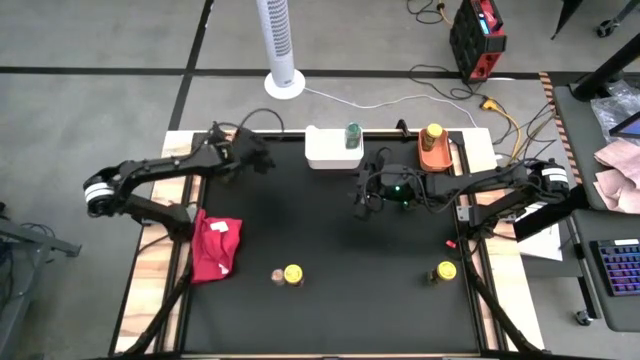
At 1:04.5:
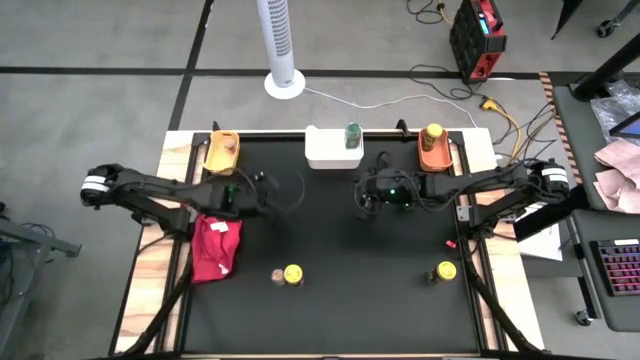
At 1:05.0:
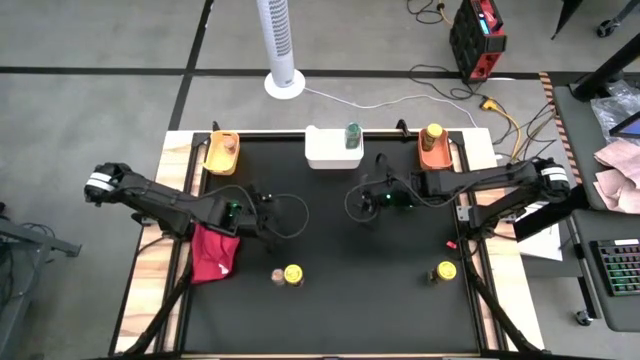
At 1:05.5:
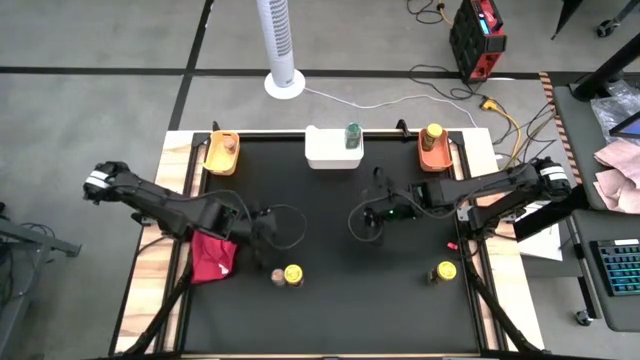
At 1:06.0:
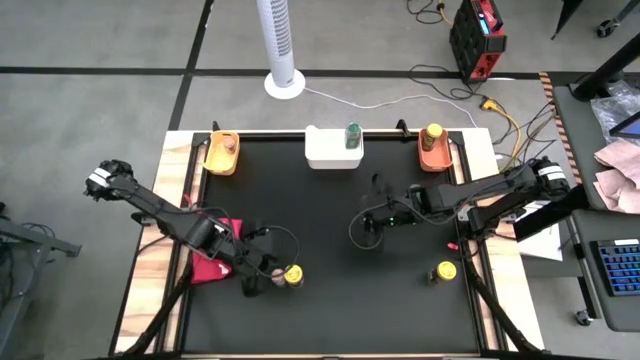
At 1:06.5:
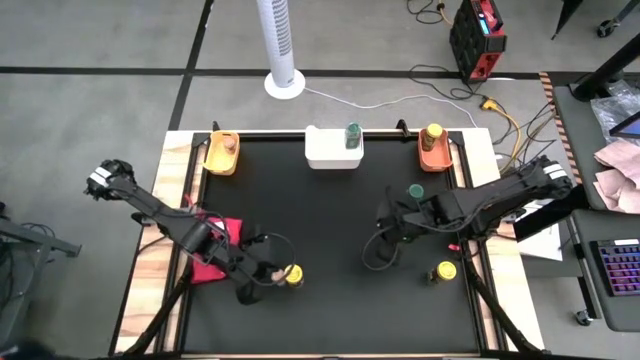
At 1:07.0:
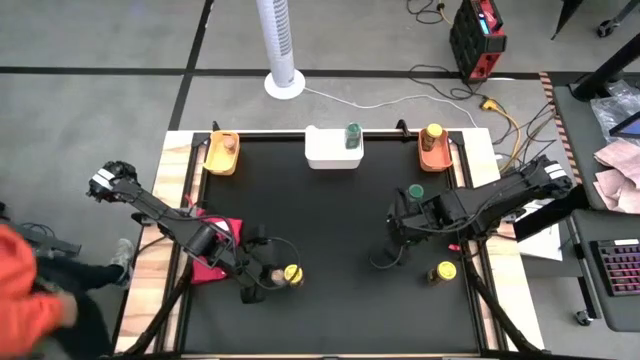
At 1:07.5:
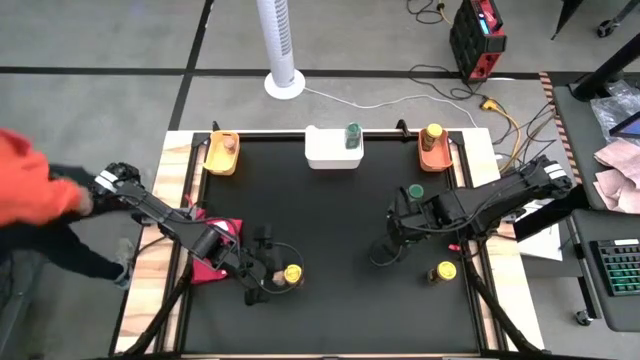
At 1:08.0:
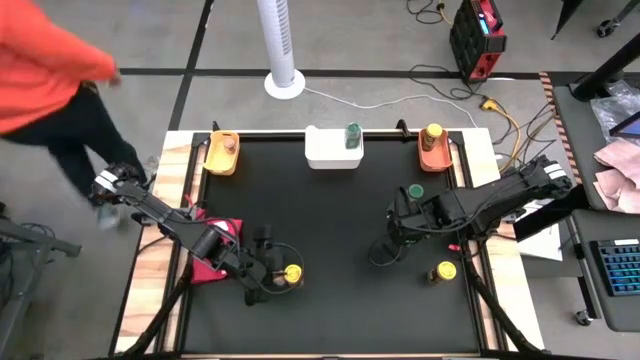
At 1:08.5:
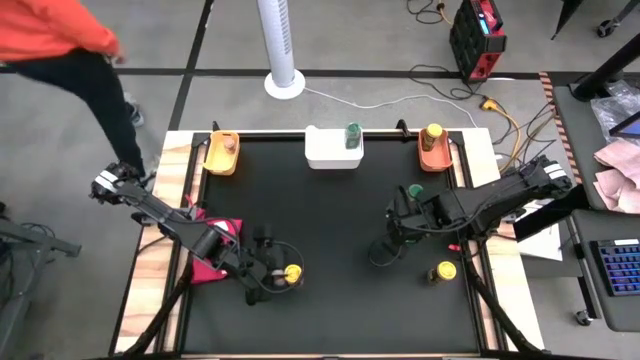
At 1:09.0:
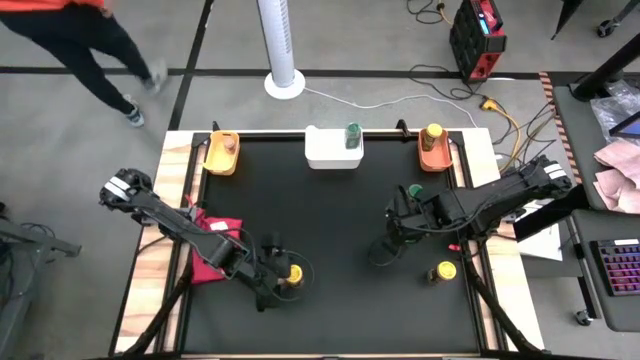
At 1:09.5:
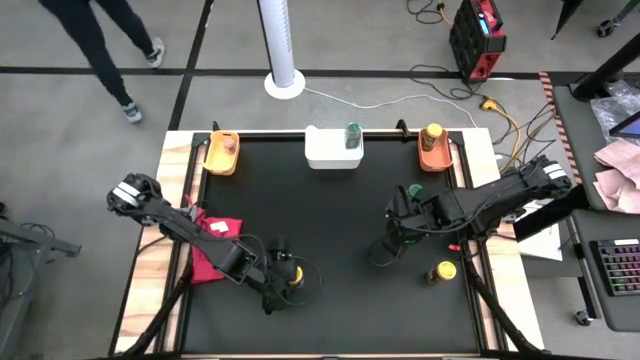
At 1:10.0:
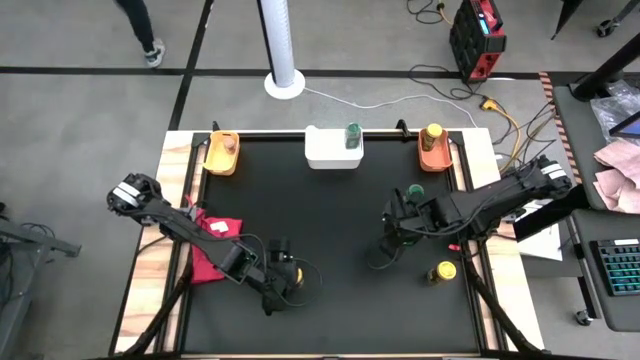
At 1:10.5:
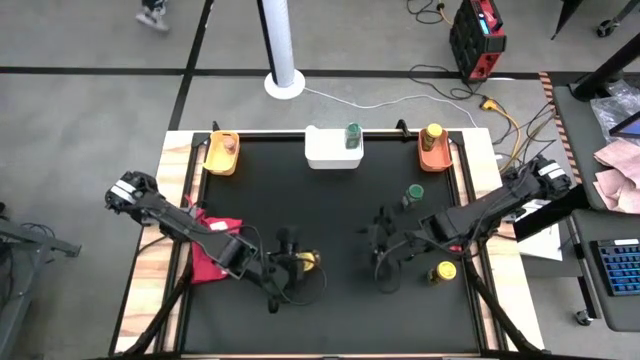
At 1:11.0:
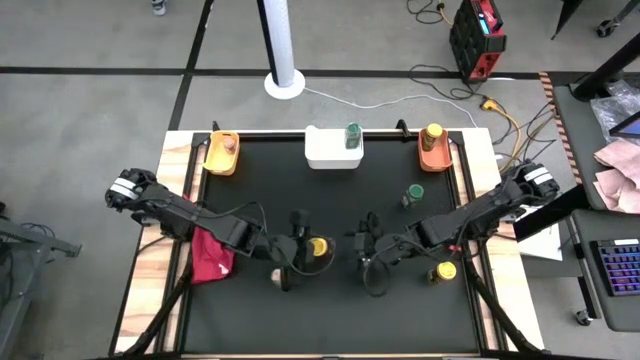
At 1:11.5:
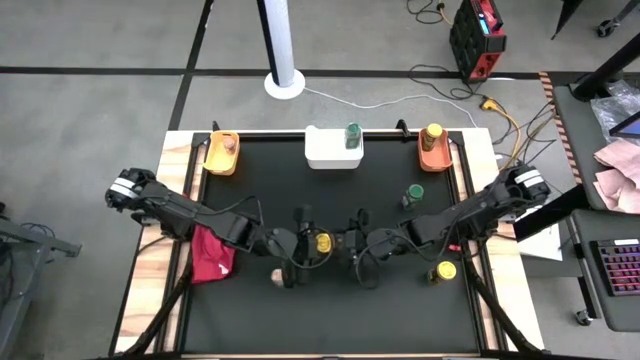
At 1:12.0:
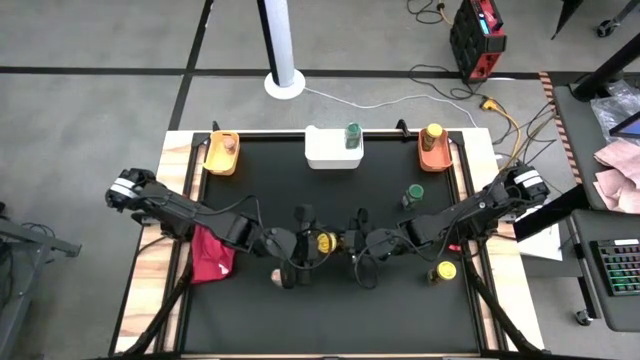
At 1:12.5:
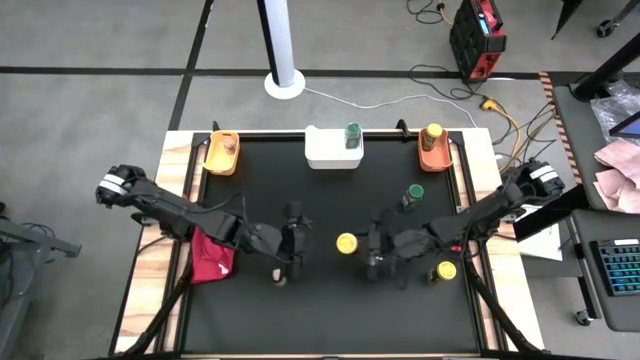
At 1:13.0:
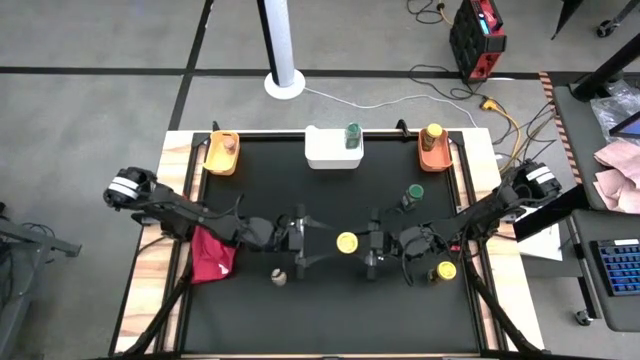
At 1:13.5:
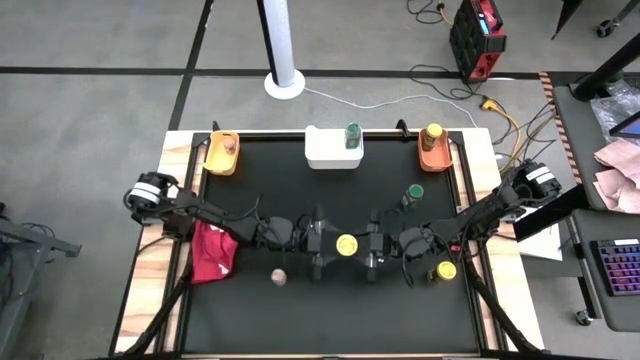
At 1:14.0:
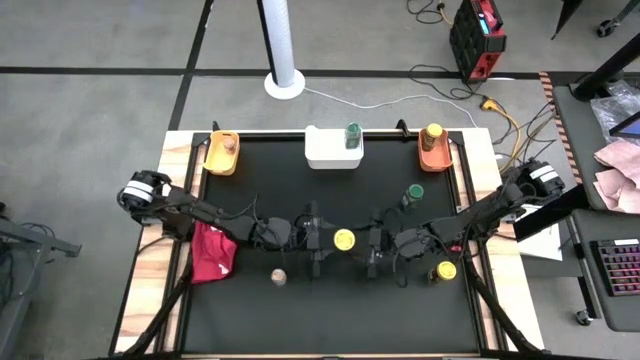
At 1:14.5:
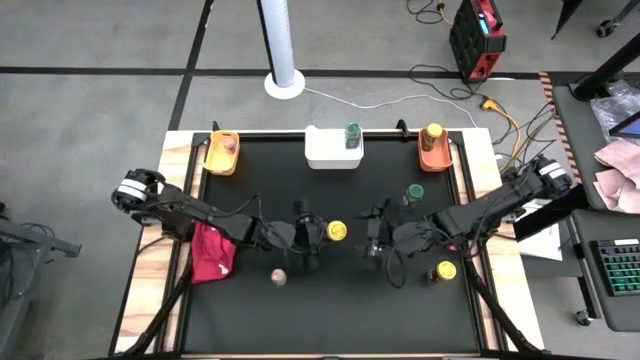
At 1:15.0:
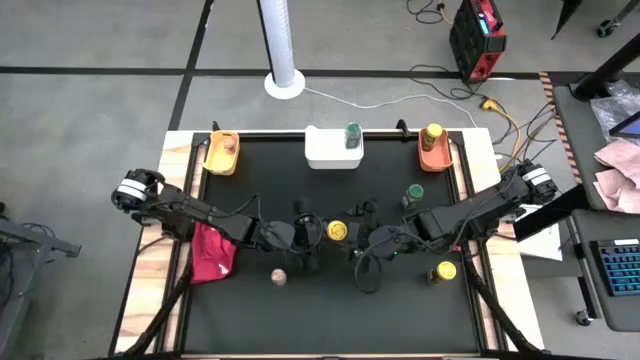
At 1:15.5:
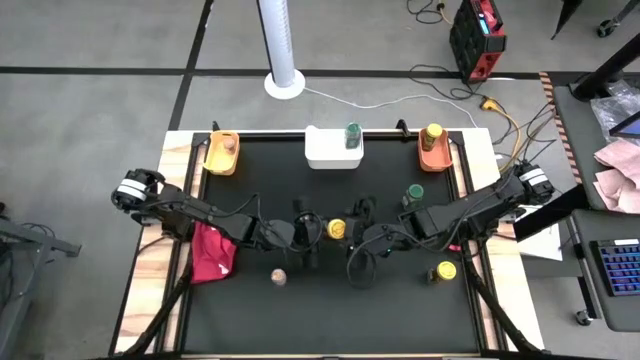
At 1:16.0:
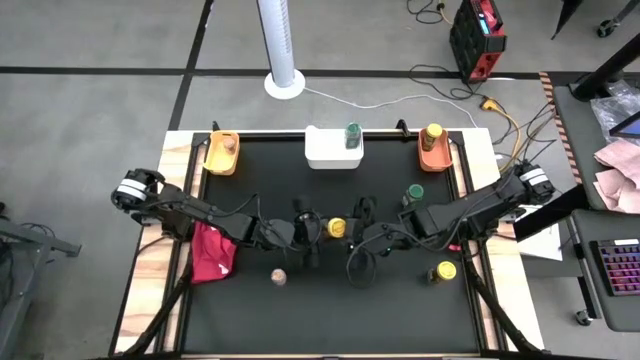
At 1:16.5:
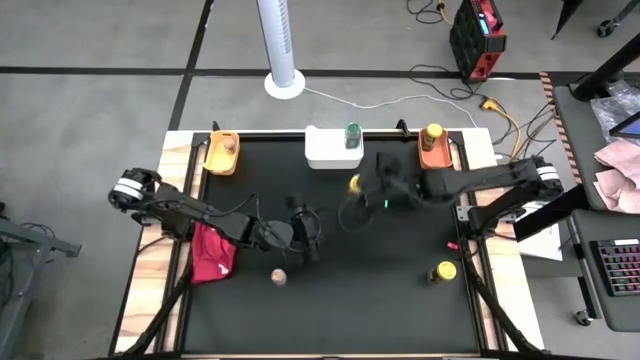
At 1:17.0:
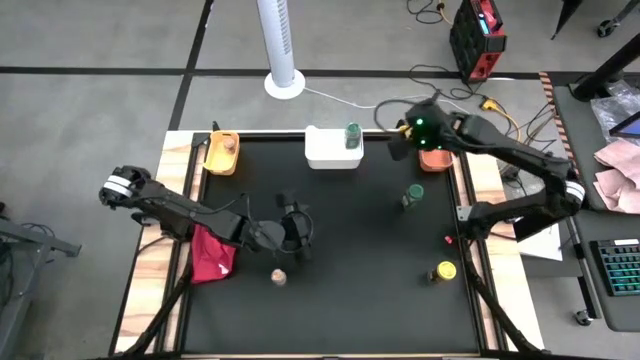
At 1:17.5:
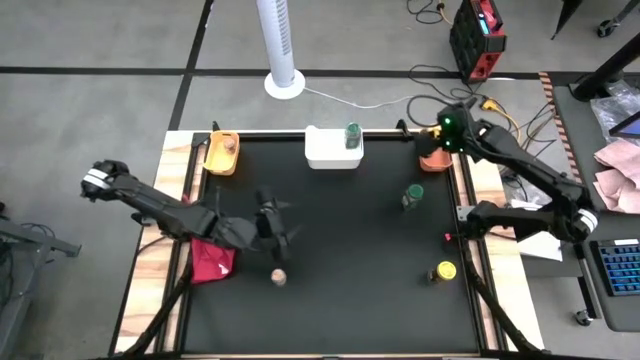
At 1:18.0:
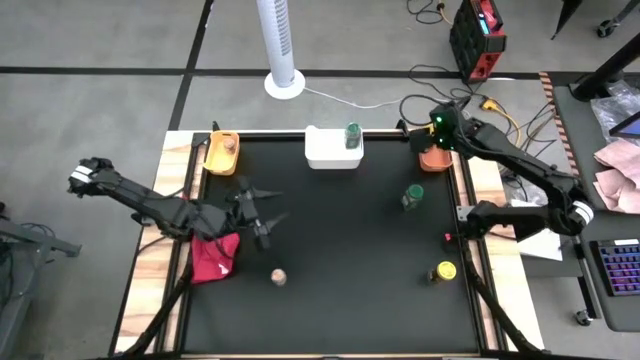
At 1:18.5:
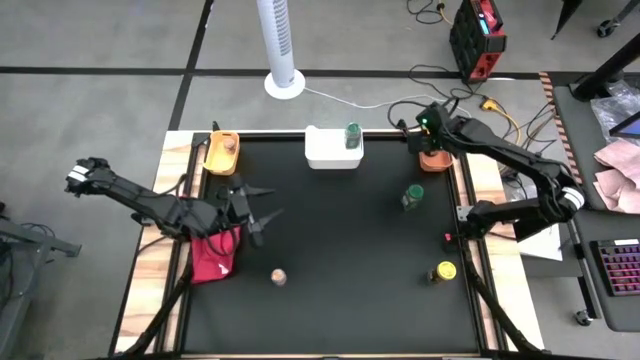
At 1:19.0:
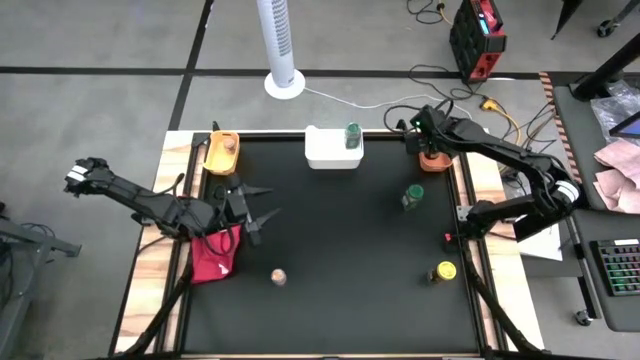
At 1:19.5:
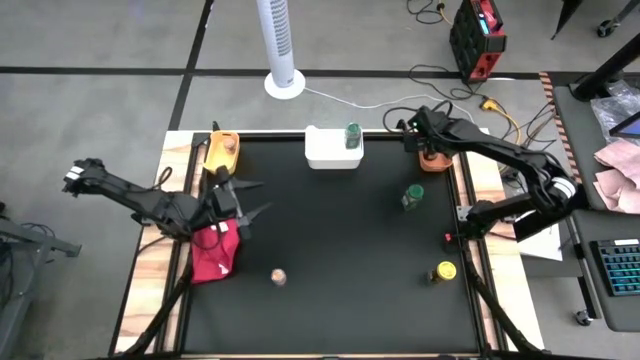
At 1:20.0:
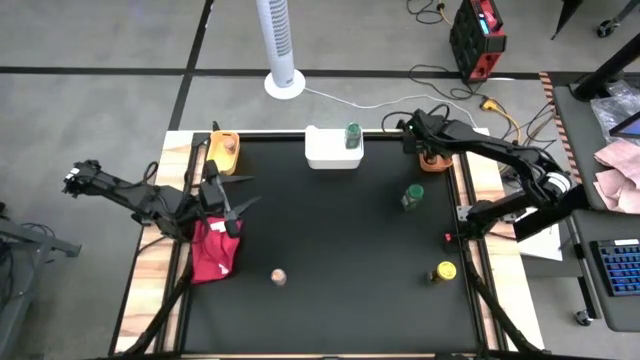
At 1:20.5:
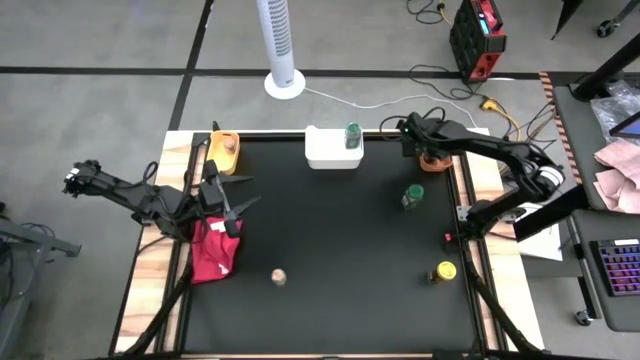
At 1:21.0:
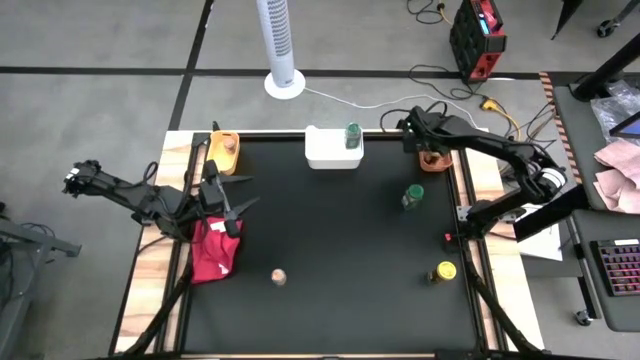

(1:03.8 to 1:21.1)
Task: Sort spices by type
Put the left dark brown spice bottle into the orange bin

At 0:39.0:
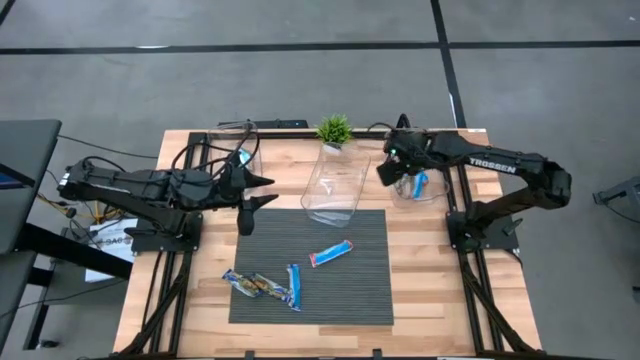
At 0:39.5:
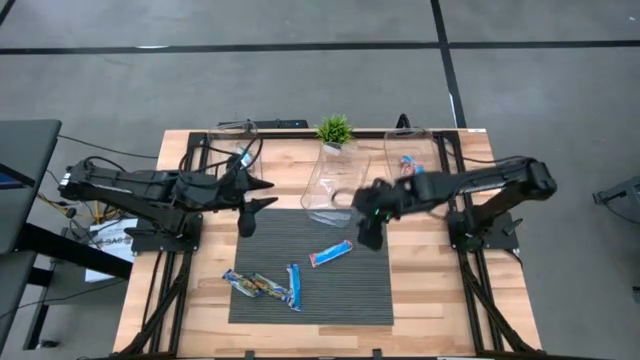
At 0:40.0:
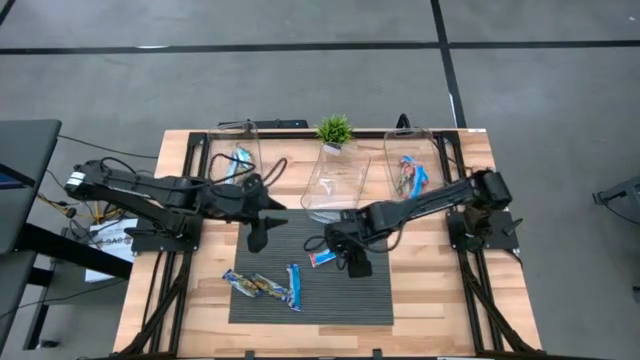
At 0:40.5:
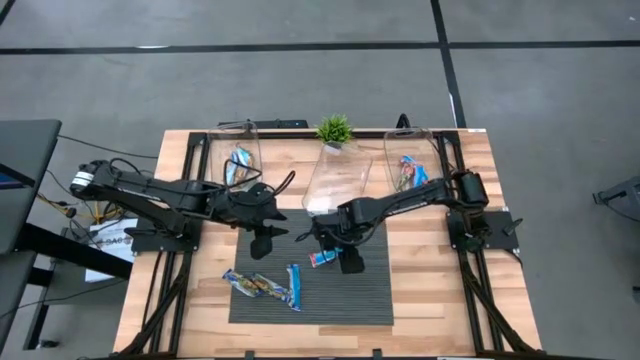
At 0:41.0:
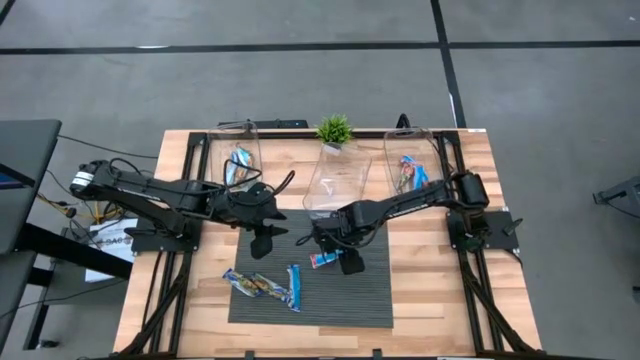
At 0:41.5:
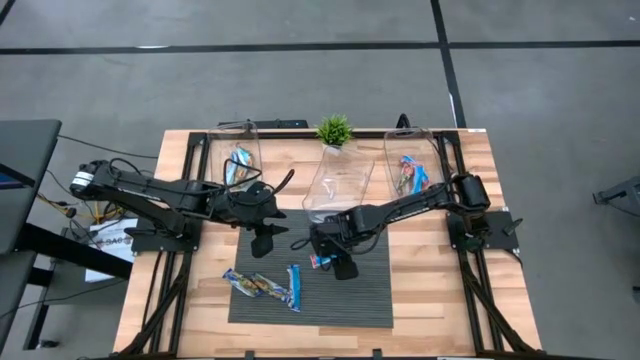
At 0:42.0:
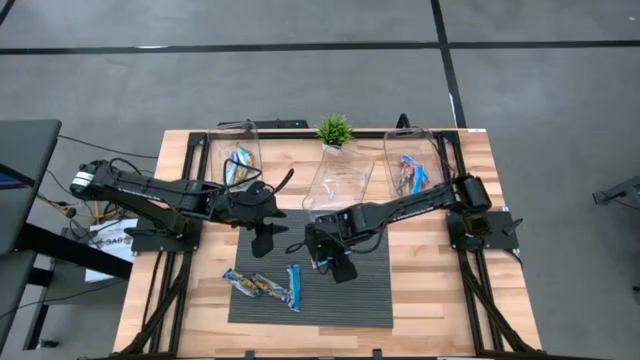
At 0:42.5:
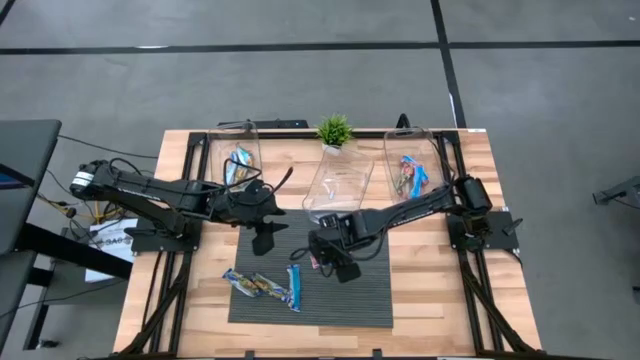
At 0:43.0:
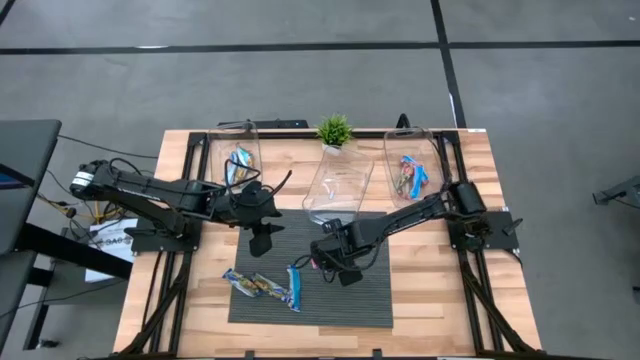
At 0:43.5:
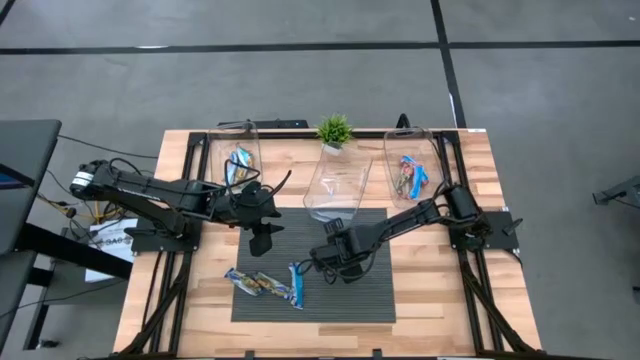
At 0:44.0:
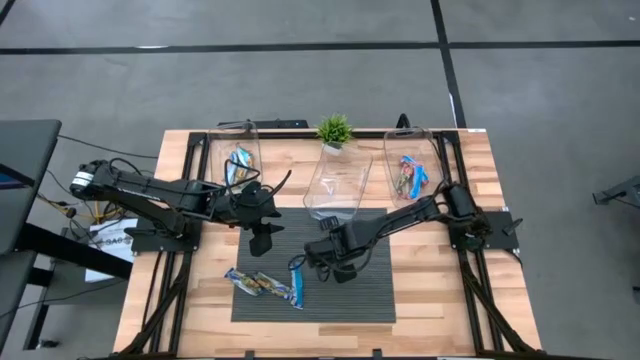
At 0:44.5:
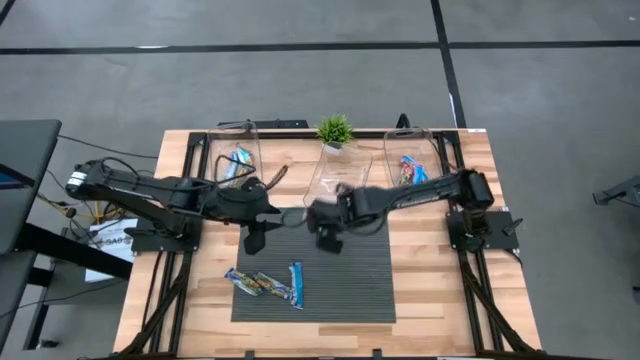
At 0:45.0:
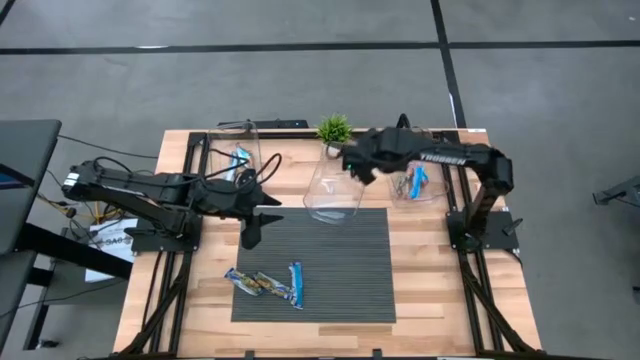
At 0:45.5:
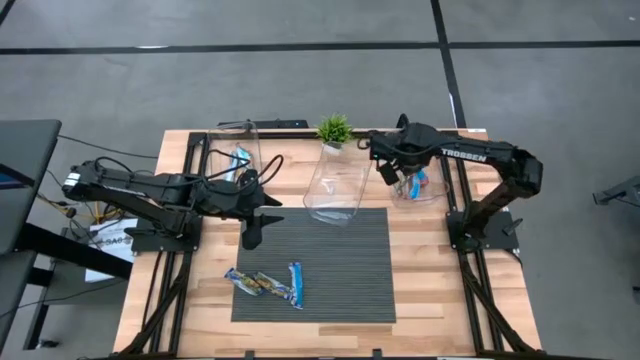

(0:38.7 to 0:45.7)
Task: Pick and place Granola Bars by type
Put the red granola bar into the right transparent bin
